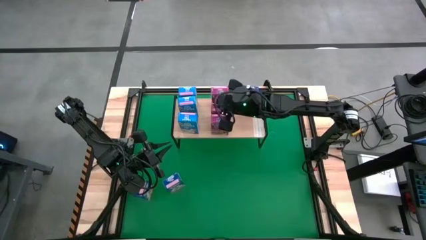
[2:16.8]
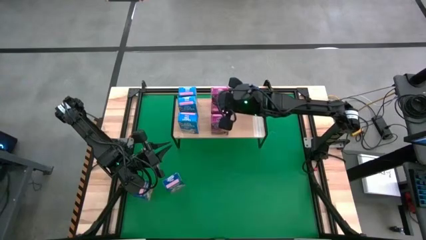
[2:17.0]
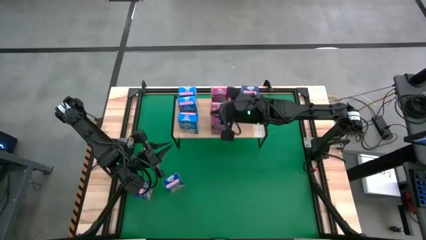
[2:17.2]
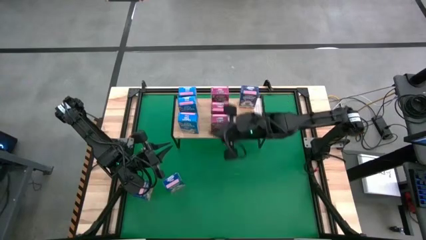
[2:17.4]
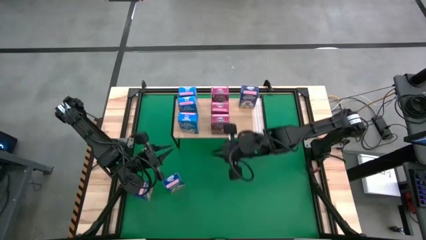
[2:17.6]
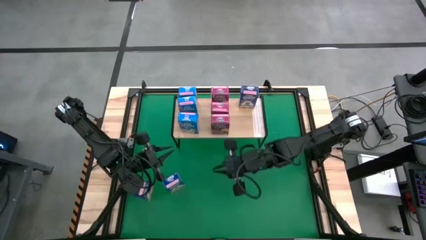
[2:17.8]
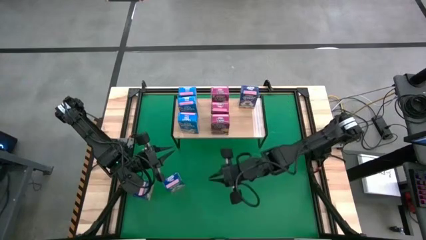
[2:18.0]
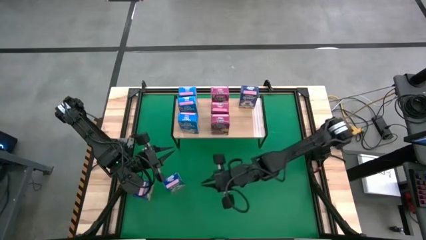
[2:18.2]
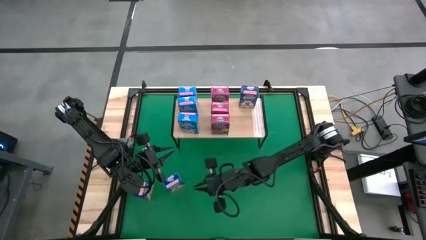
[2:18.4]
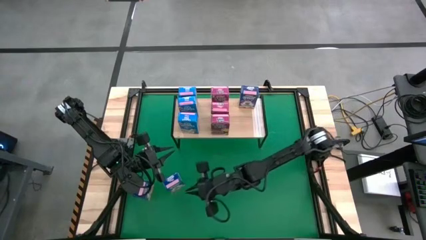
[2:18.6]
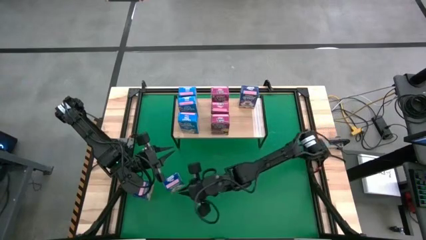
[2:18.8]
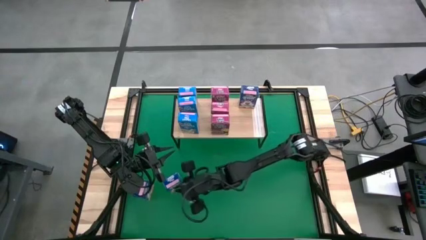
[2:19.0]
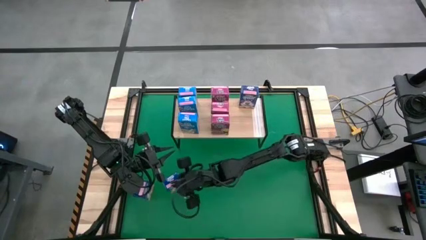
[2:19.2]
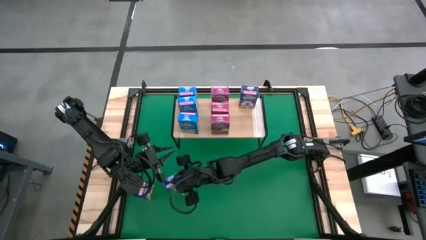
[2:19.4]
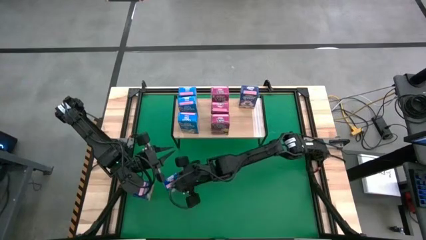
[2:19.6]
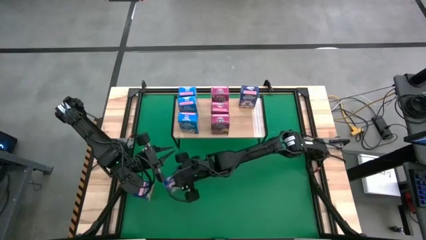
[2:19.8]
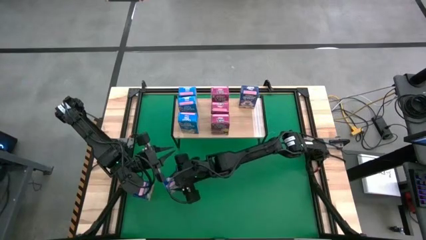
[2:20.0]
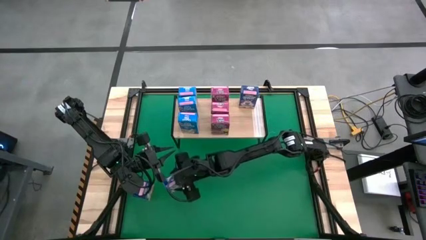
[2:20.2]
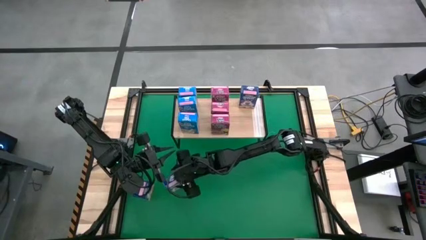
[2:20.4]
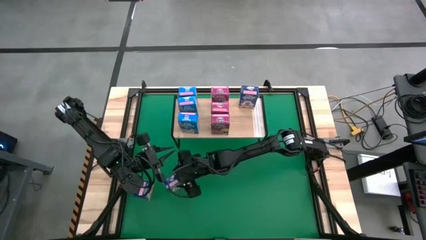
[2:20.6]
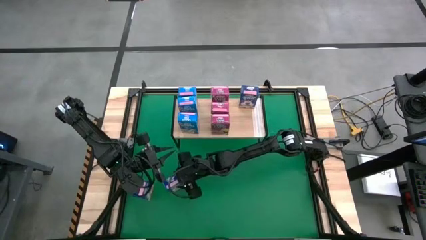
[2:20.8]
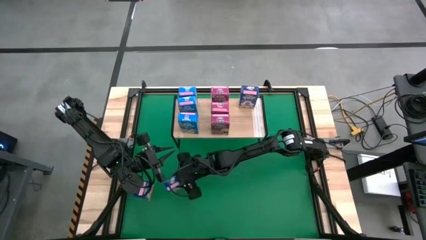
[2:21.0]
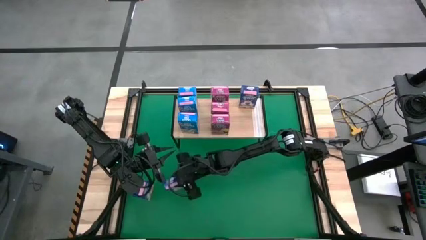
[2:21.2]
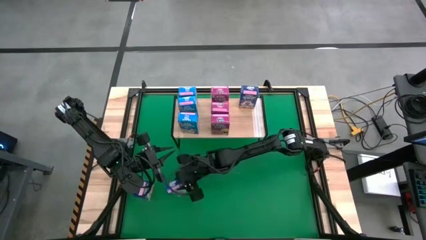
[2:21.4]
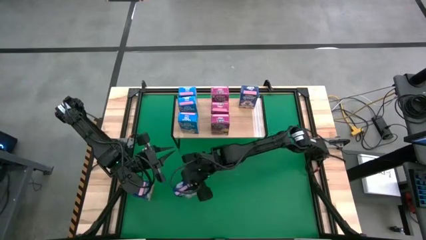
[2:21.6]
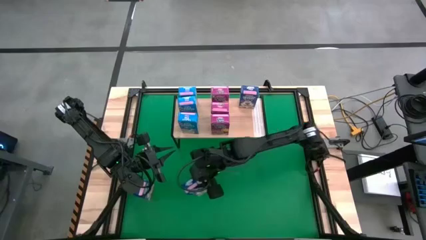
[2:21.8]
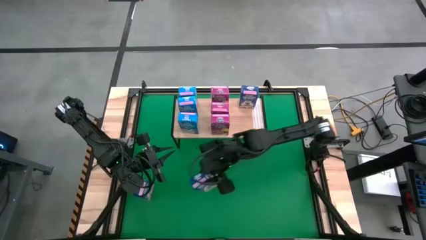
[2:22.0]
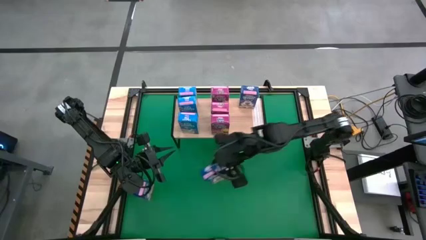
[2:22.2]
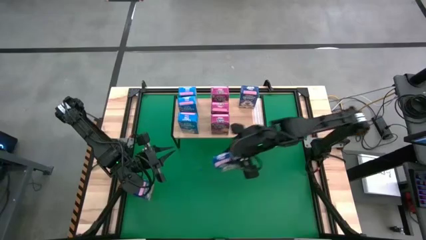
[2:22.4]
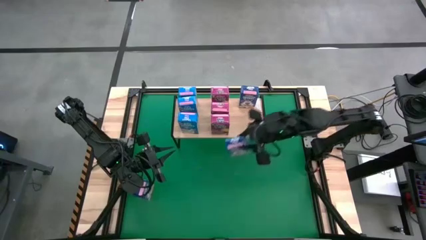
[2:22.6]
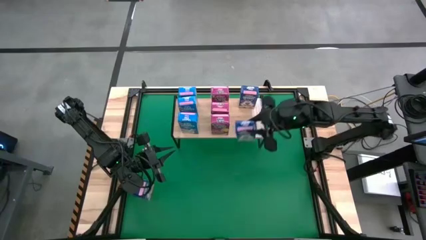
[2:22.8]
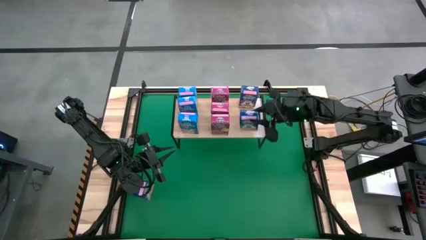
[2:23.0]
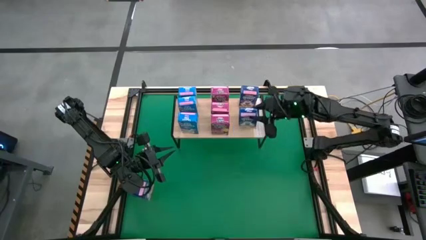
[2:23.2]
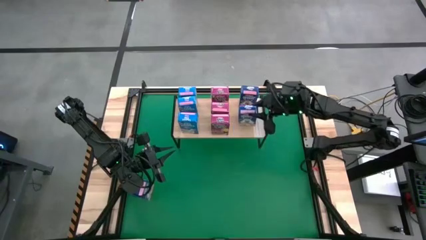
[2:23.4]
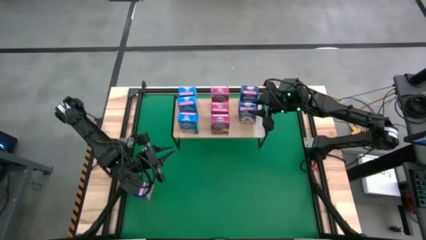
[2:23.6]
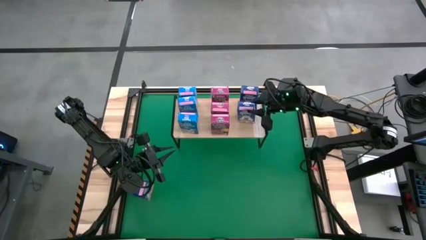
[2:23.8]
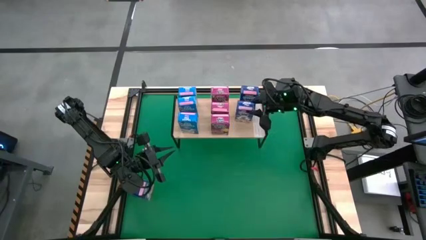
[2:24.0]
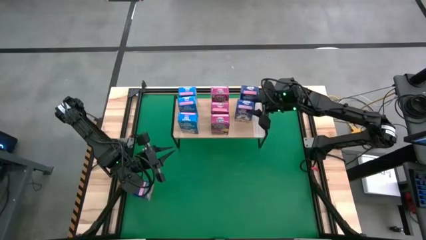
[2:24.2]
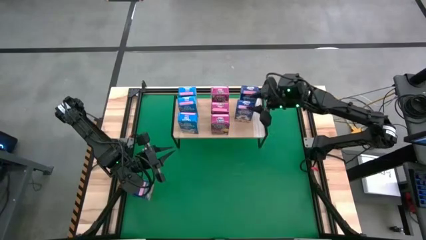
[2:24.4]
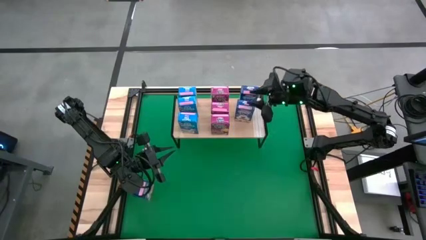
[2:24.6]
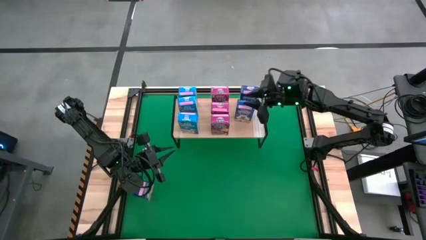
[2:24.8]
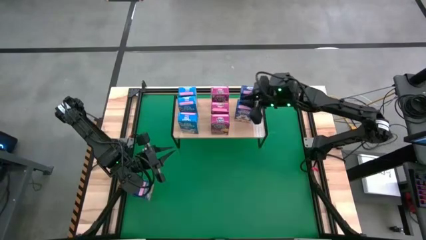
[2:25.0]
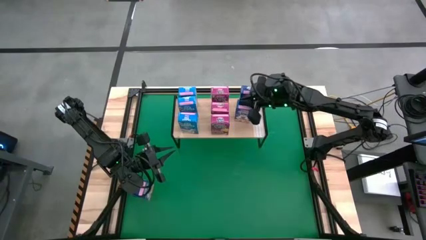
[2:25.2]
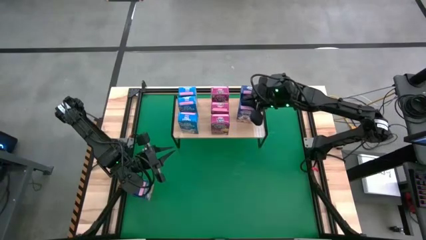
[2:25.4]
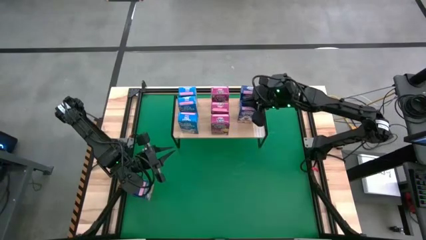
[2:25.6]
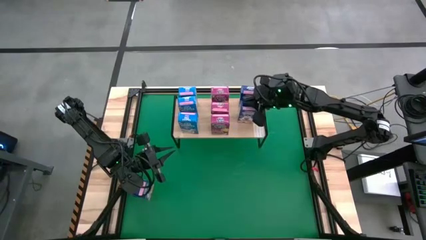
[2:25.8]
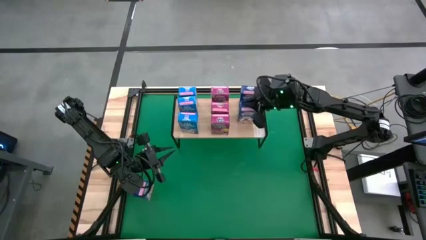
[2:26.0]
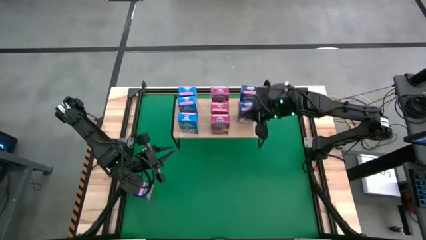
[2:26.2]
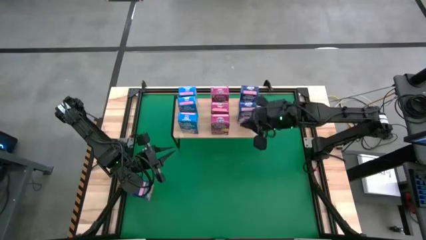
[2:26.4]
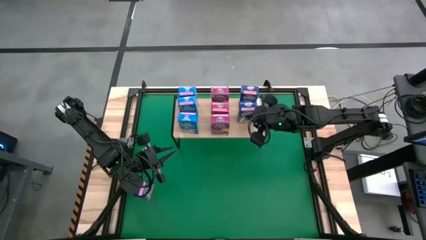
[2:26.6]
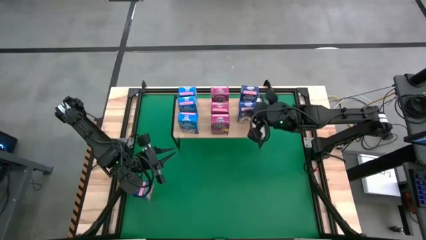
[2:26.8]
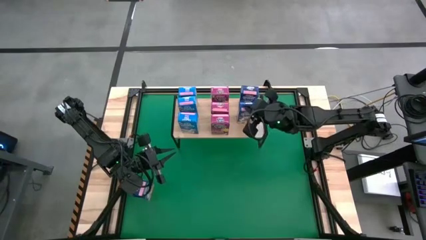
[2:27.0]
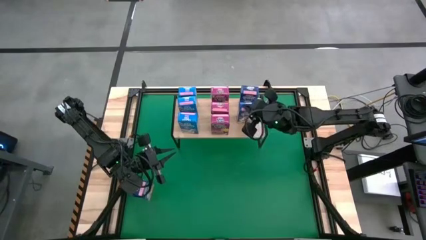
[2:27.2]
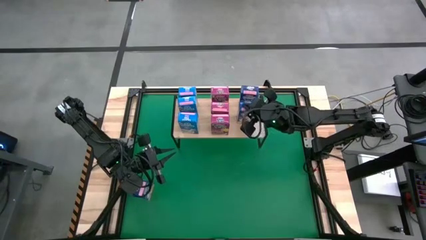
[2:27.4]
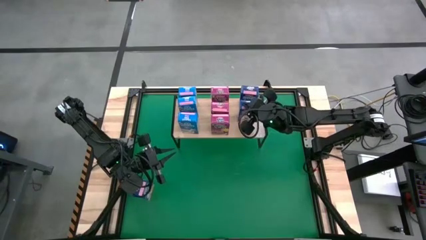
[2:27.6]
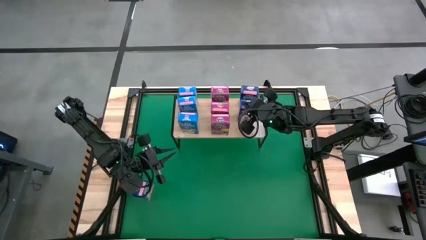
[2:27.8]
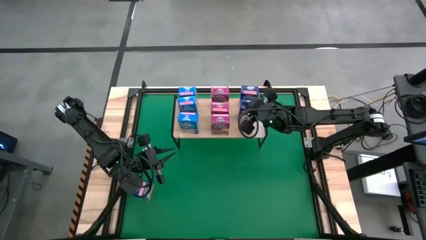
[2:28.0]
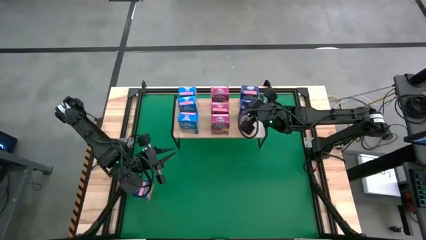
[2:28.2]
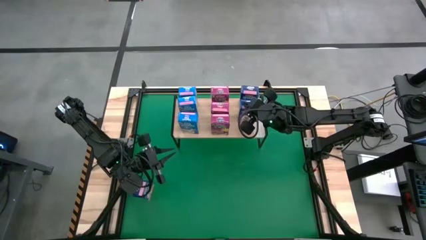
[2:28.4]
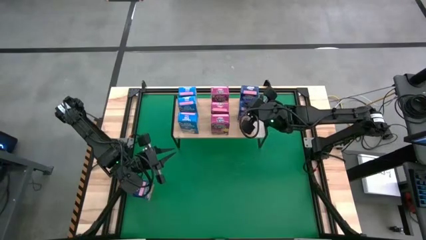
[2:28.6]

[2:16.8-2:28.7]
Task: Stack cereal on shelf
Put the right dark blue cereal box, aligned with the other dark blue cereal box on the shelf
